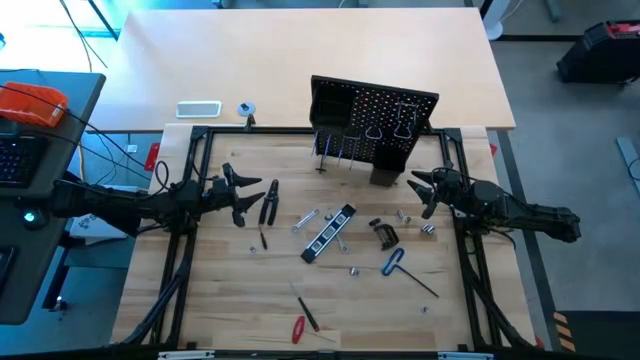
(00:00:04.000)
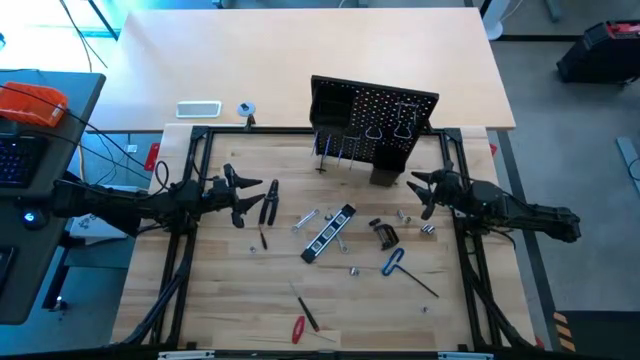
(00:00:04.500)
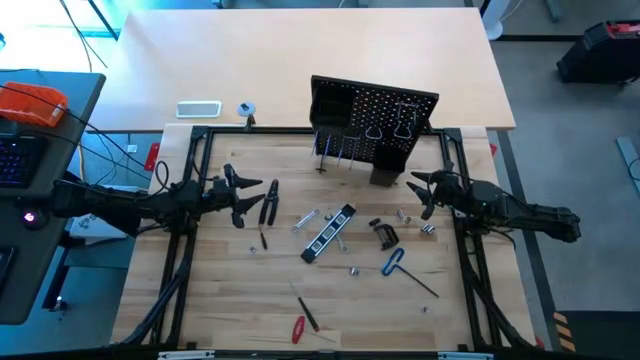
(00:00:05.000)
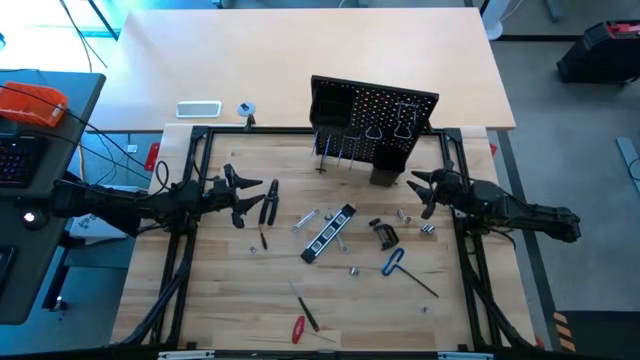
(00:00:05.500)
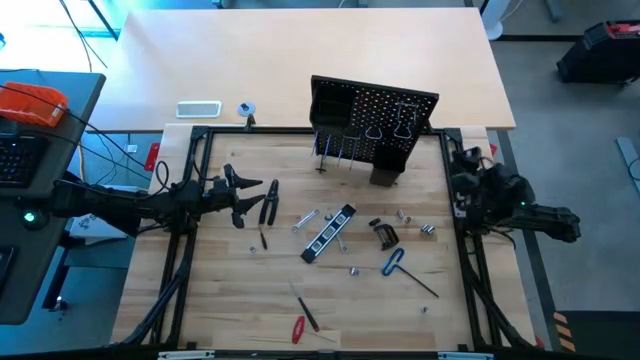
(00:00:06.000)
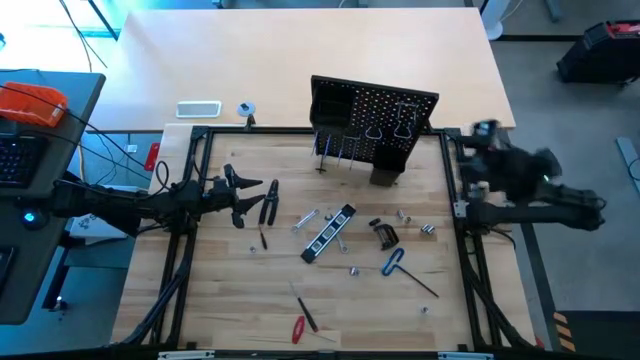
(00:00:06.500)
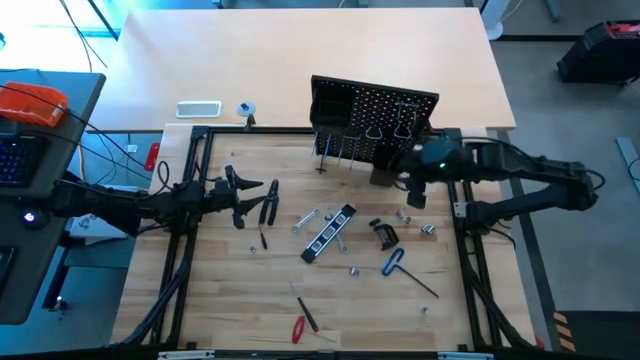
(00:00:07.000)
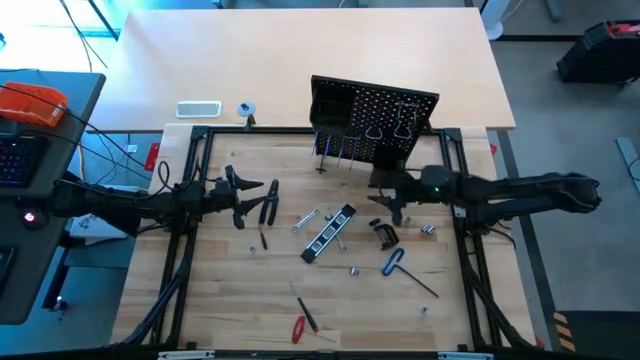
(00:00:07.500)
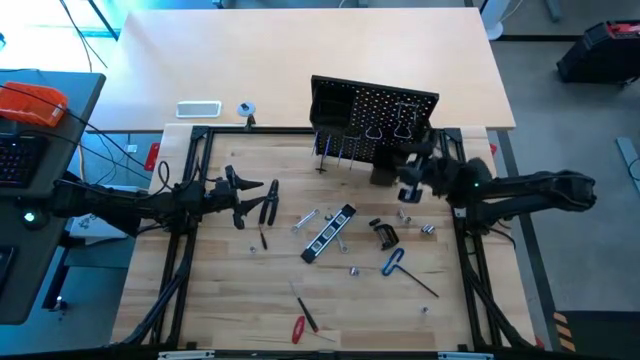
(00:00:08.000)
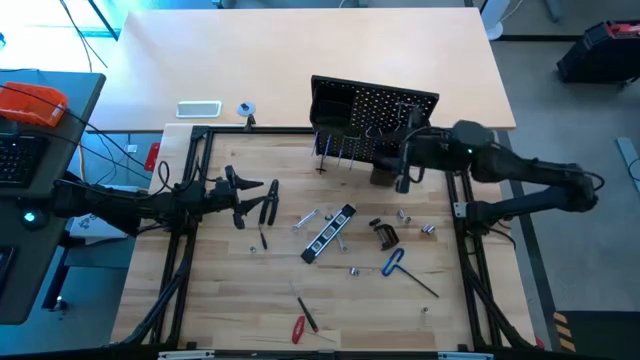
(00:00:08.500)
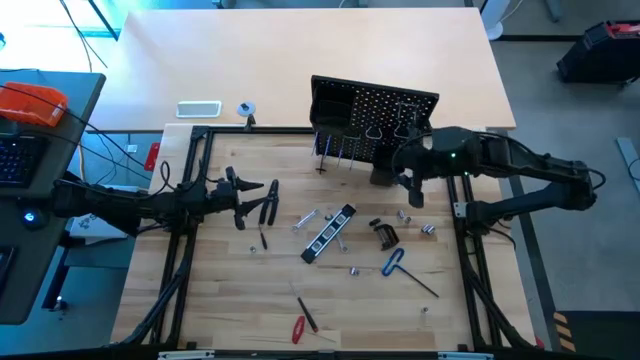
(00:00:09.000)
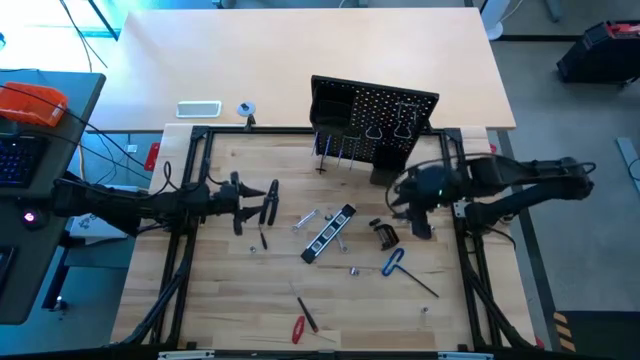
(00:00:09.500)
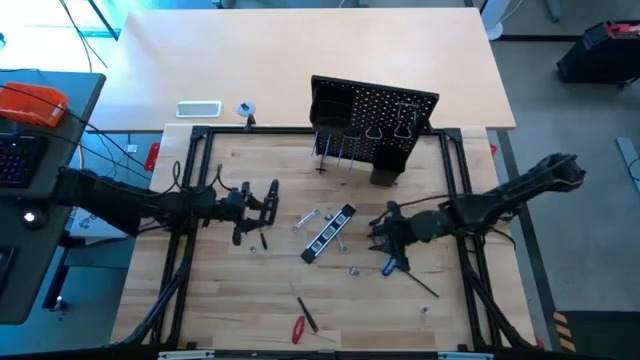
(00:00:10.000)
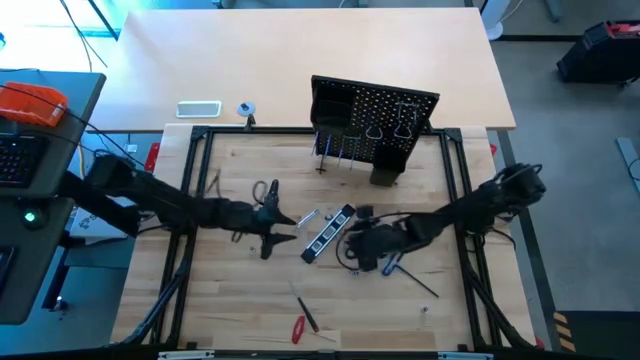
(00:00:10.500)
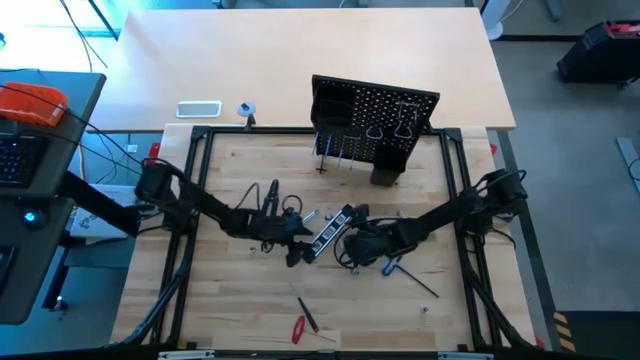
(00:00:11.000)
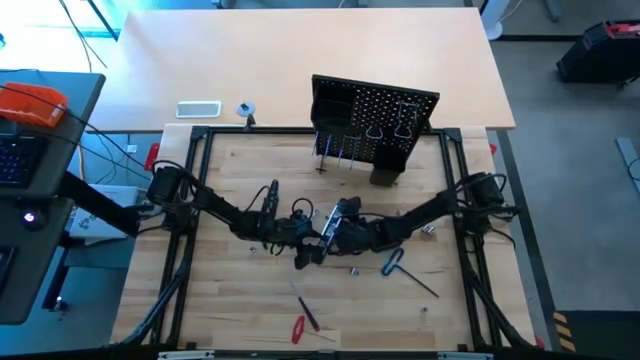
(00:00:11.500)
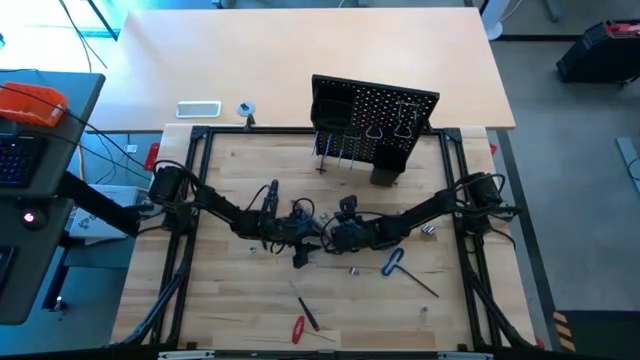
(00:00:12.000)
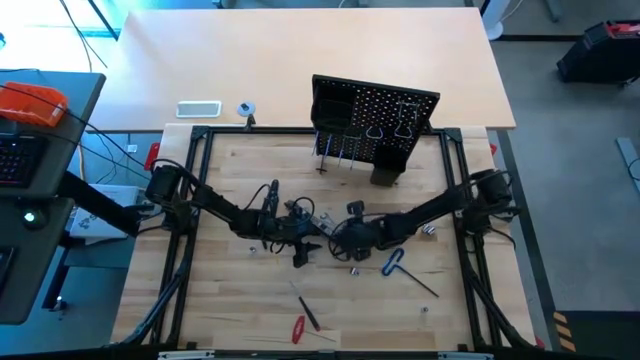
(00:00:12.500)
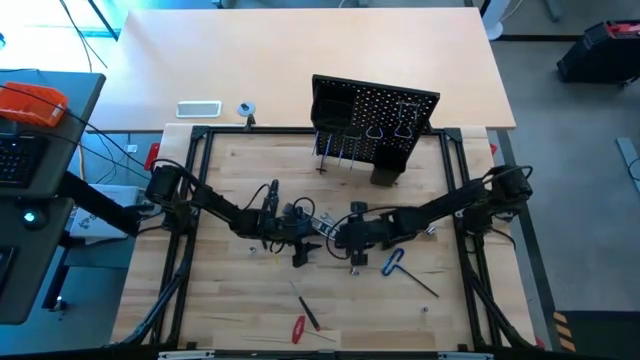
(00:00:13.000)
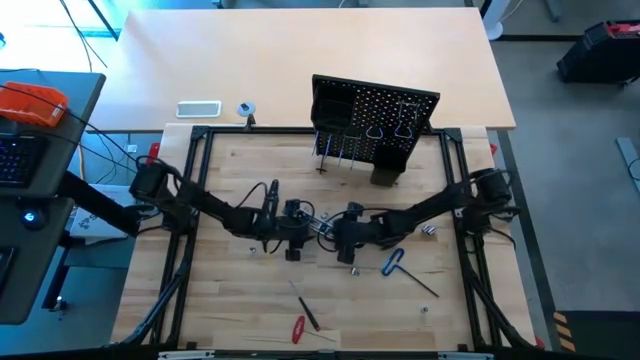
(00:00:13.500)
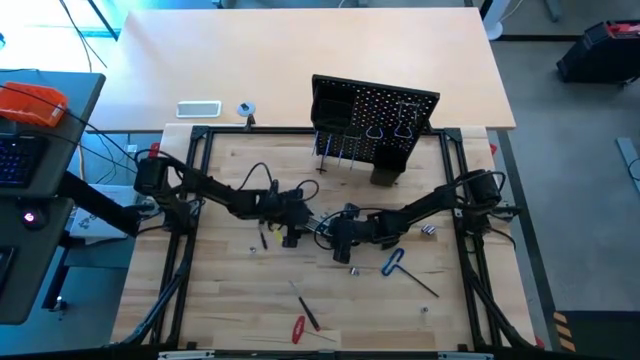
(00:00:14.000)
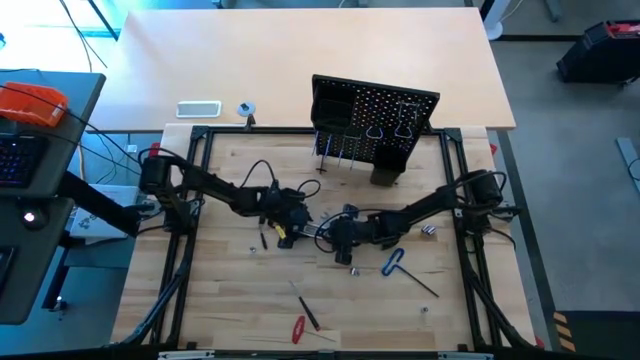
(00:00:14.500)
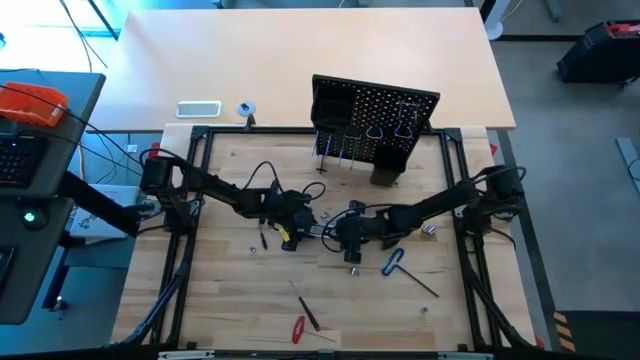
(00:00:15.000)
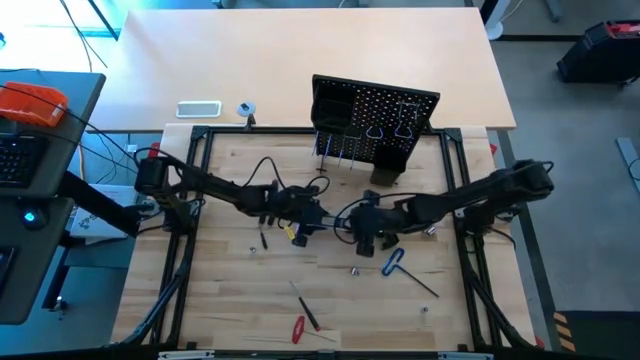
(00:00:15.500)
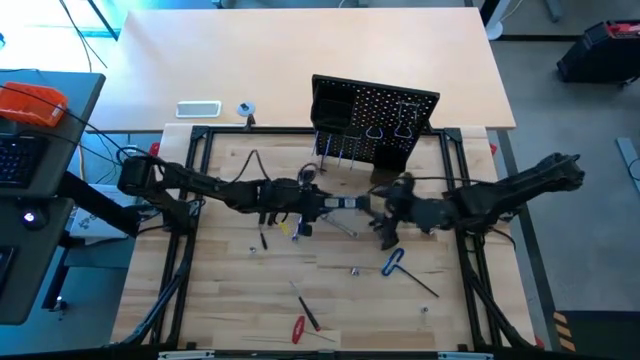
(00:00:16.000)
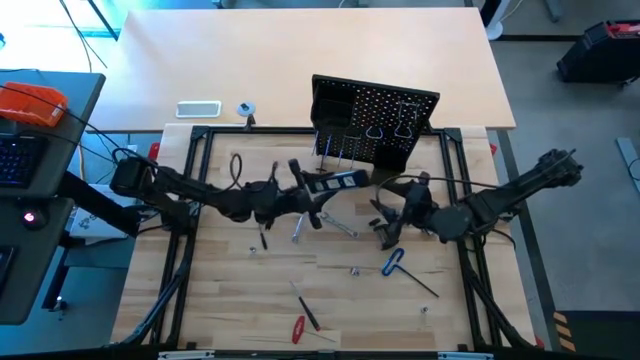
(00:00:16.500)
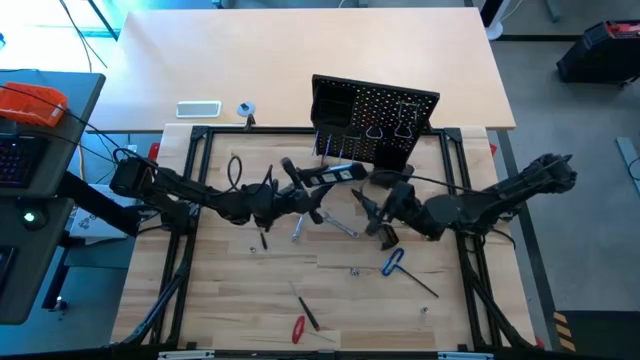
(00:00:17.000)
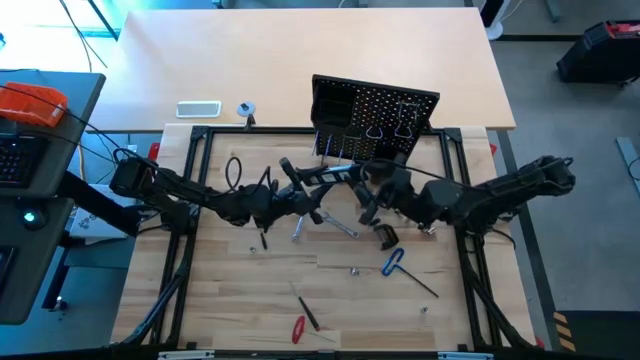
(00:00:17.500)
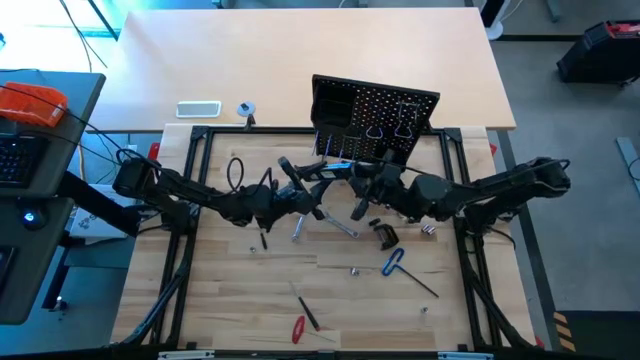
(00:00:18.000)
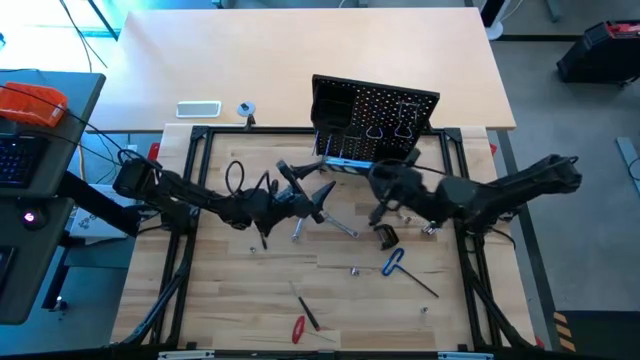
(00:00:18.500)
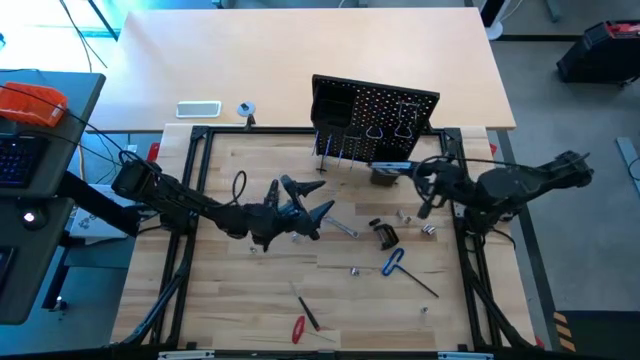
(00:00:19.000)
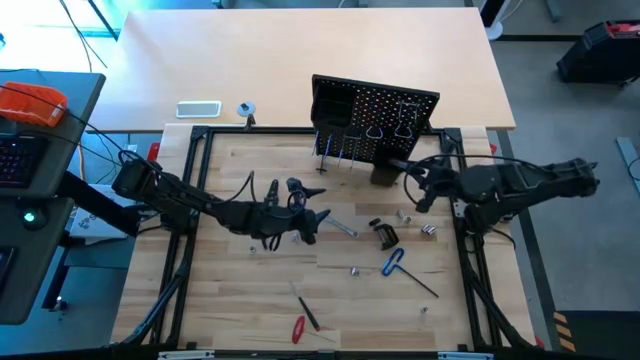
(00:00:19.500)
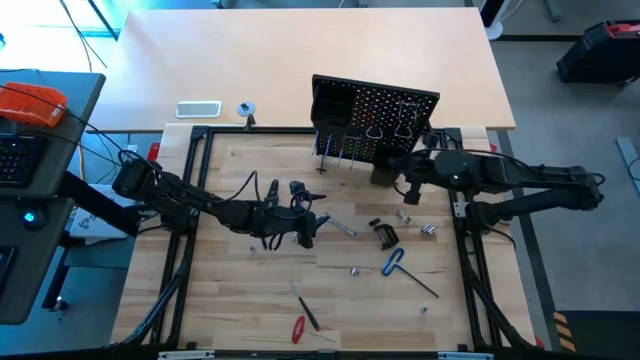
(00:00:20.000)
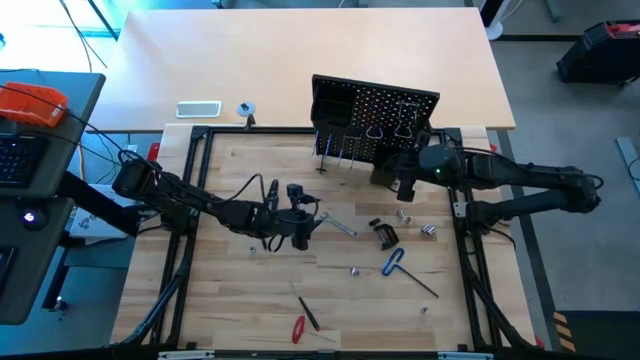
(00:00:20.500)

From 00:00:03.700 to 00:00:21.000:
Task: Hang tools onto peg board
Hang the black spirit level onto the pegboard
